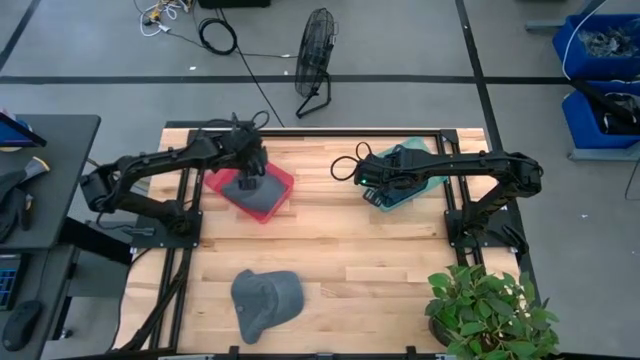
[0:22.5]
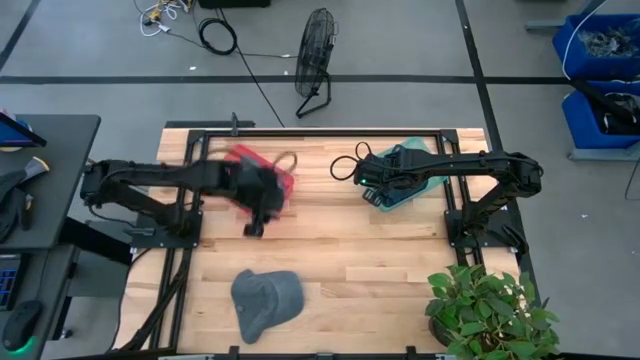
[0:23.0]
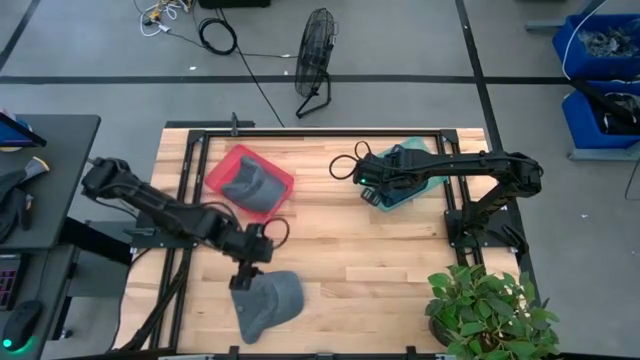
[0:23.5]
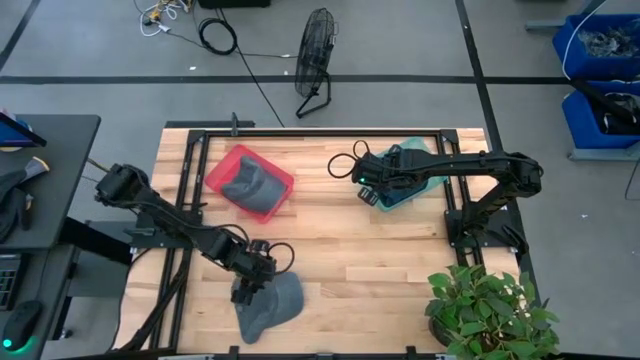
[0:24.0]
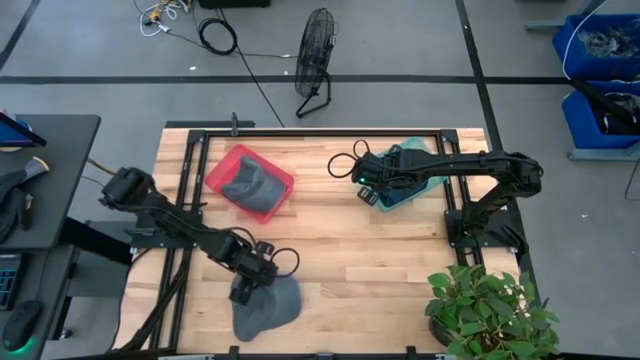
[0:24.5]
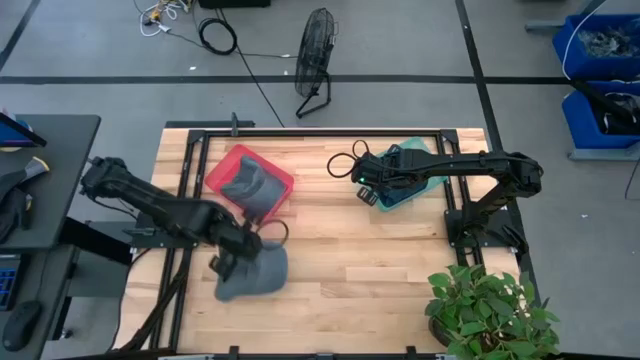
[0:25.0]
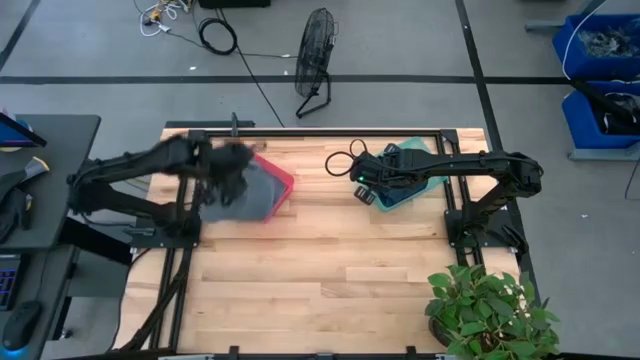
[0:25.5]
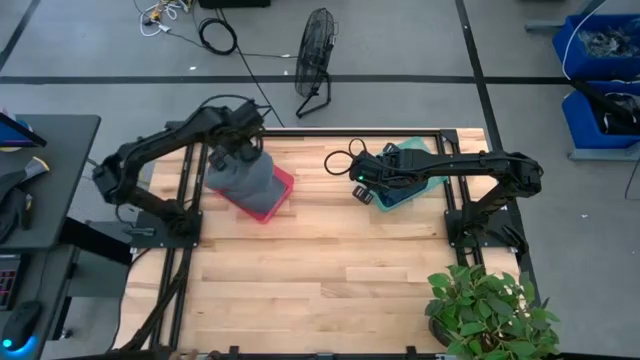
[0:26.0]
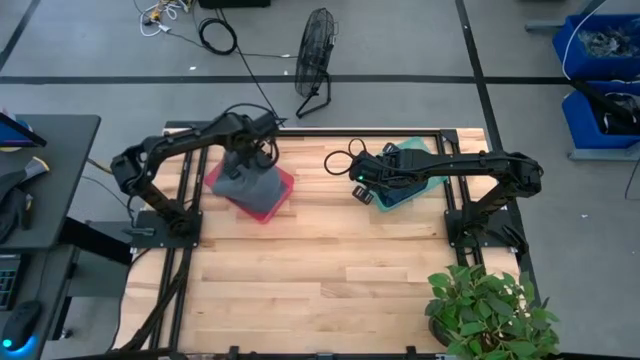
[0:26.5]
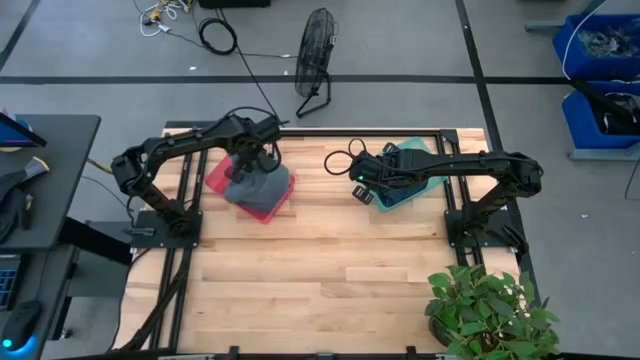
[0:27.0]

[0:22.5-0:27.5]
Task: Pick & Place hat
Put the gray cap into the red bin

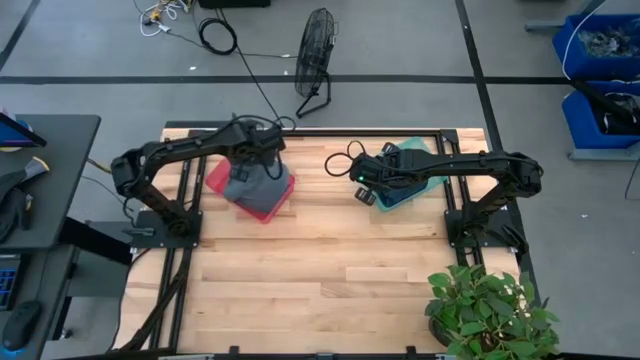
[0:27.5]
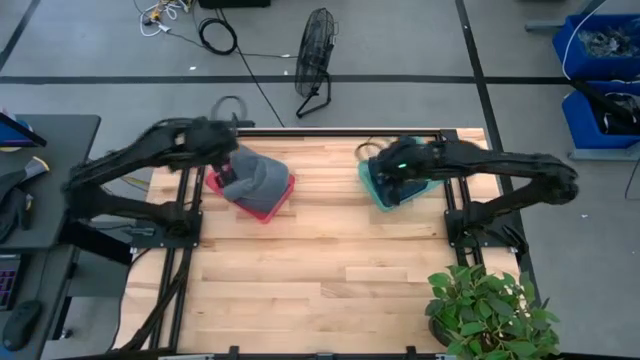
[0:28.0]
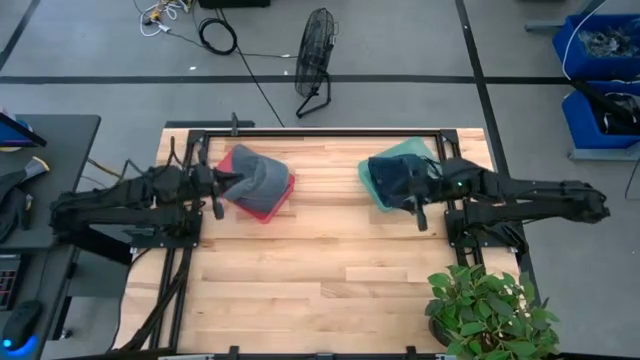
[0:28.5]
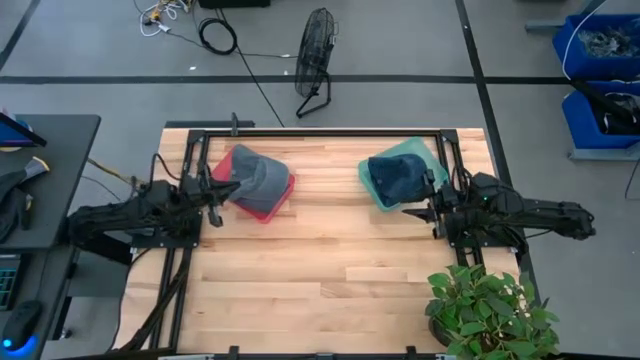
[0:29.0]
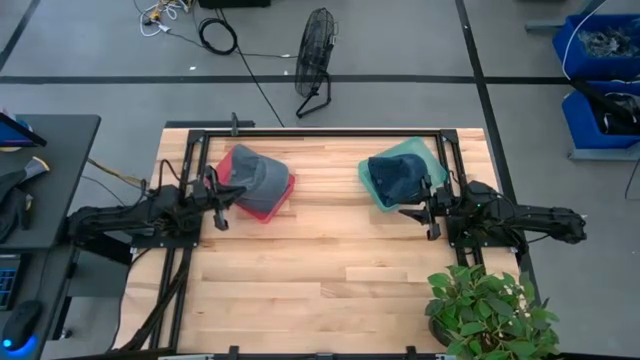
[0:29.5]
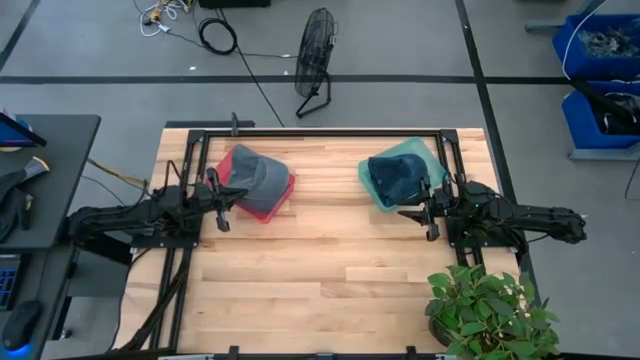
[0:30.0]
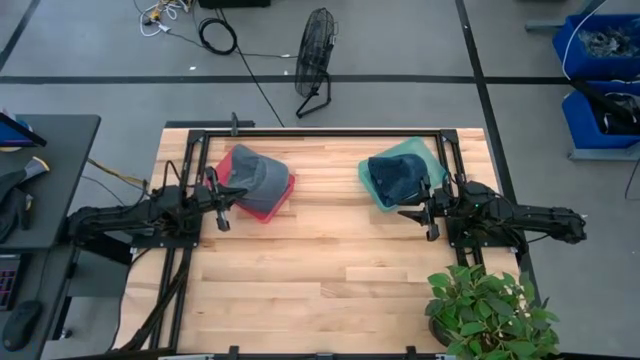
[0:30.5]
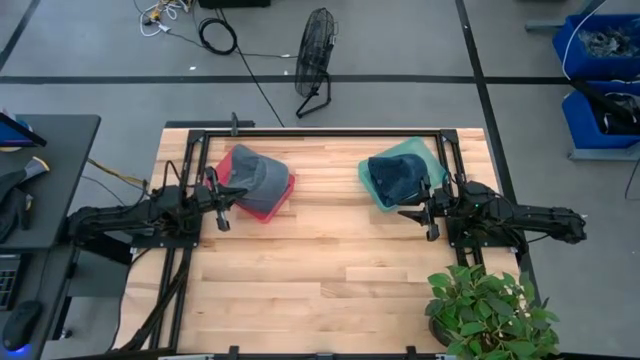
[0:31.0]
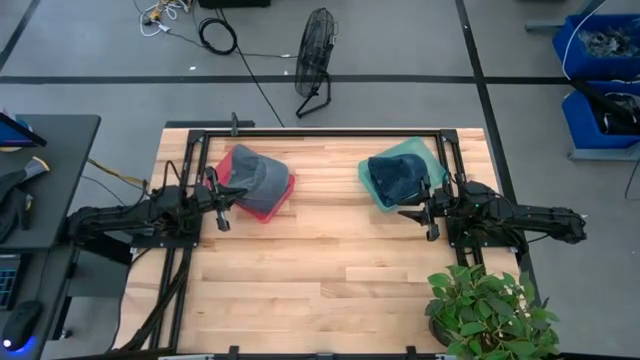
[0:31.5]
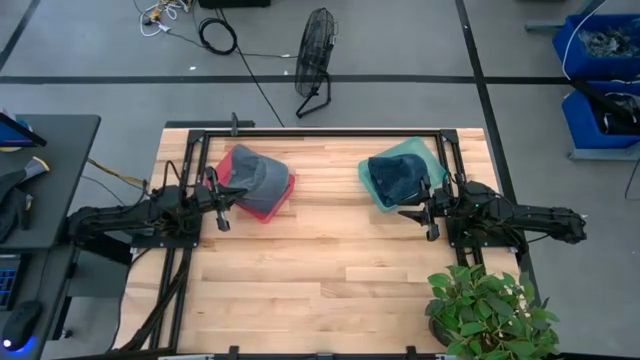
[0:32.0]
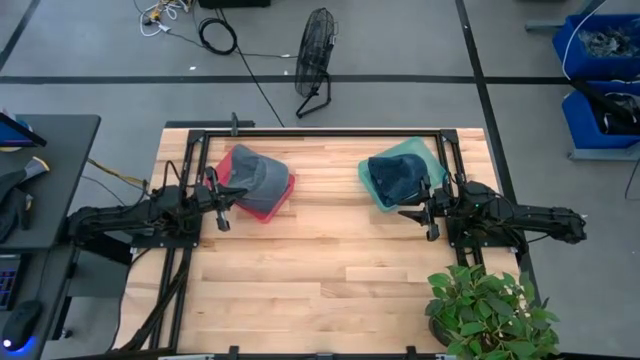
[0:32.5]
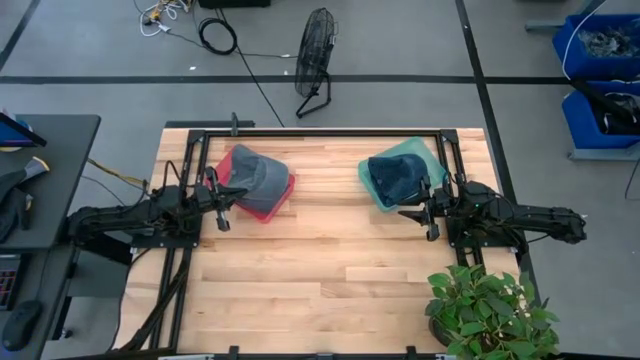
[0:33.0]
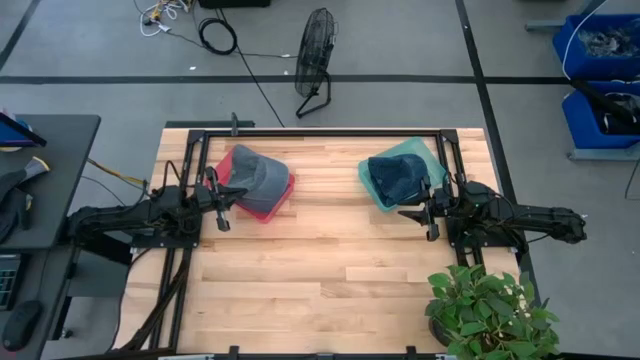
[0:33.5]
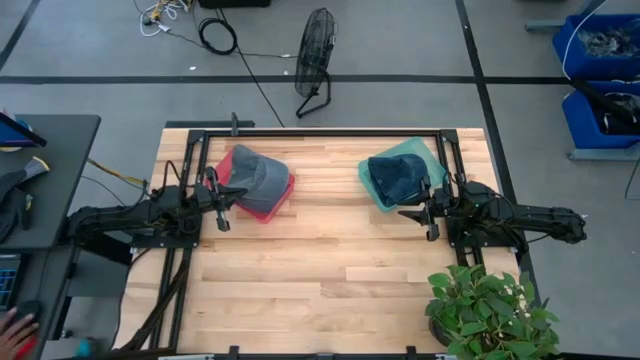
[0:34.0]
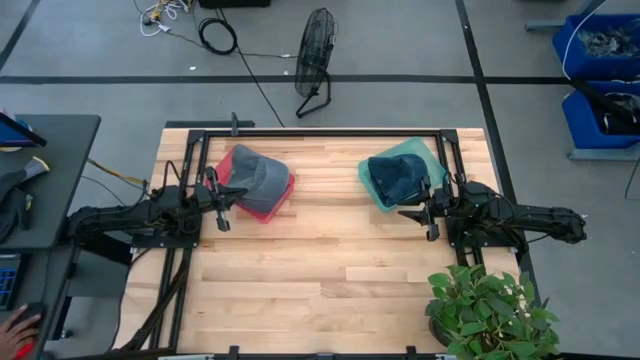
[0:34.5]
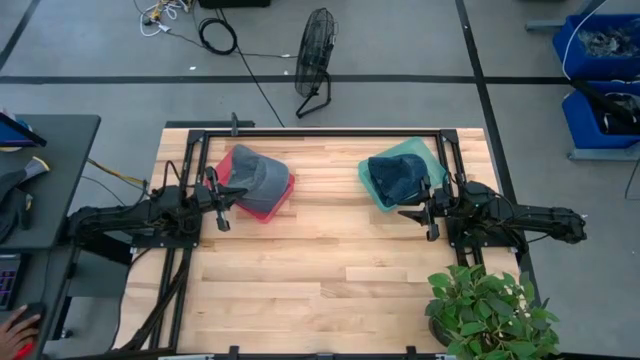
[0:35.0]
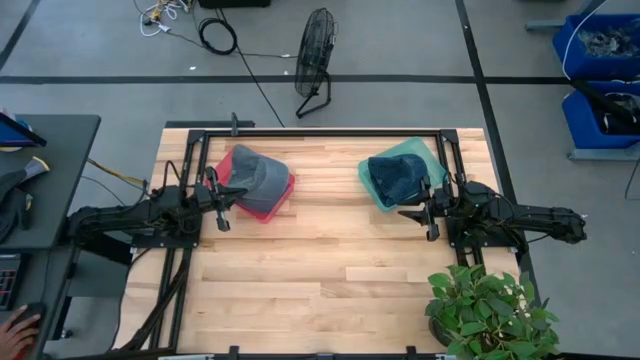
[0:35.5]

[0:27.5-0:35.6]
Return to Home Position

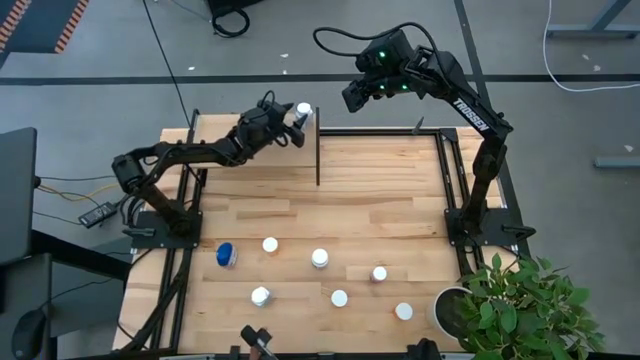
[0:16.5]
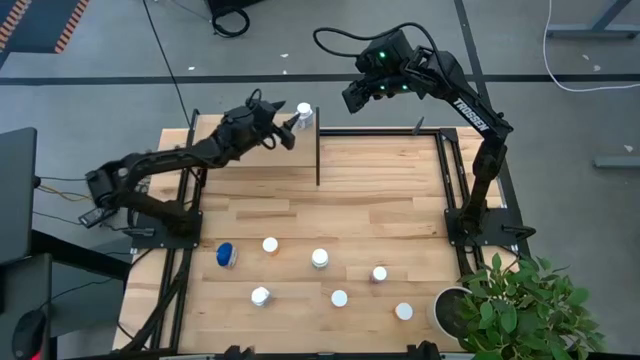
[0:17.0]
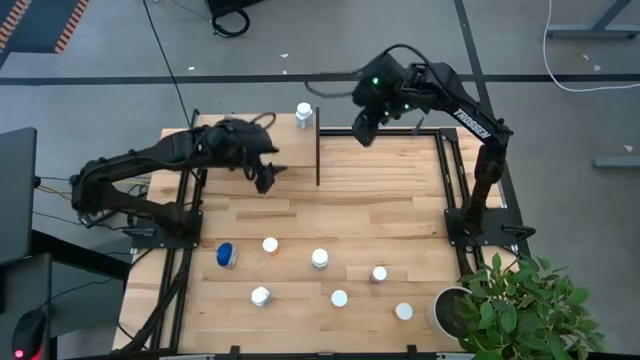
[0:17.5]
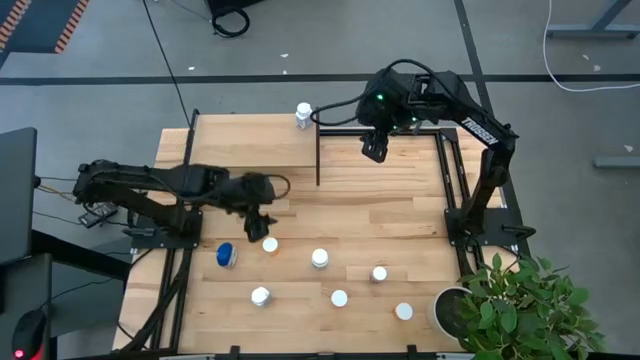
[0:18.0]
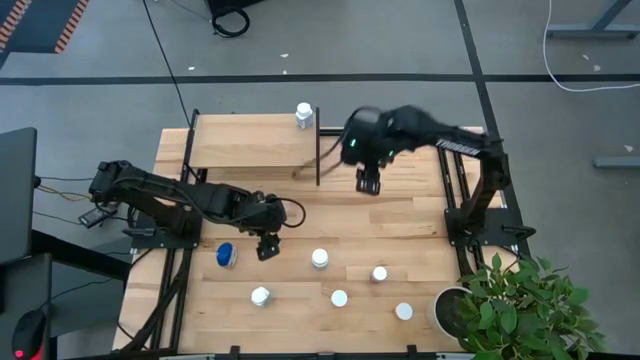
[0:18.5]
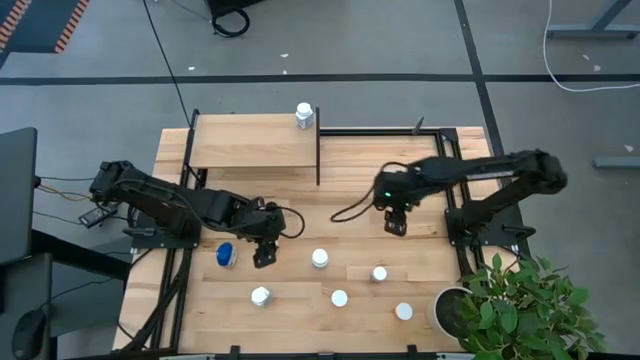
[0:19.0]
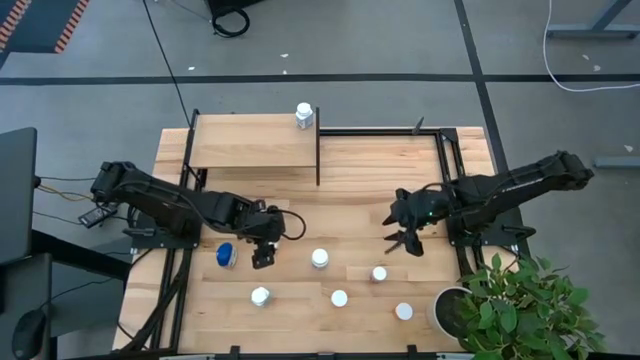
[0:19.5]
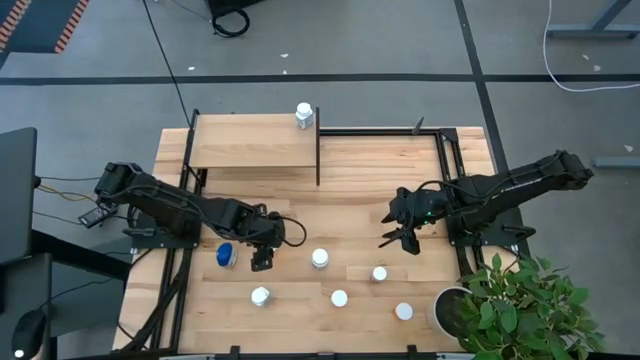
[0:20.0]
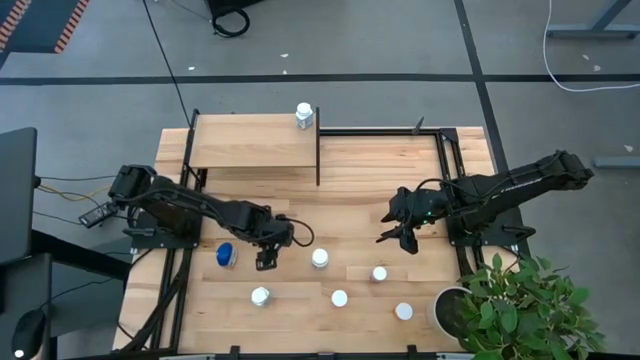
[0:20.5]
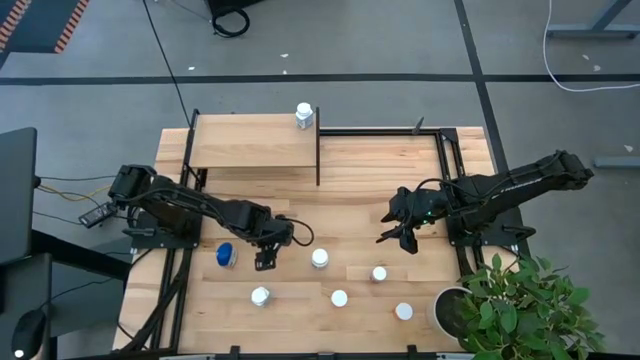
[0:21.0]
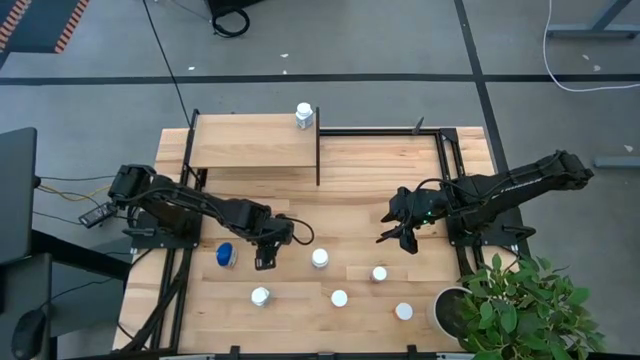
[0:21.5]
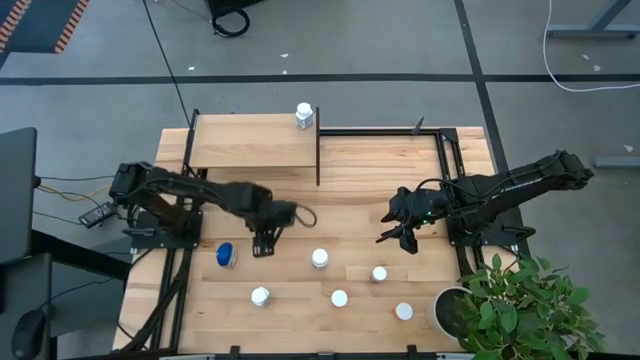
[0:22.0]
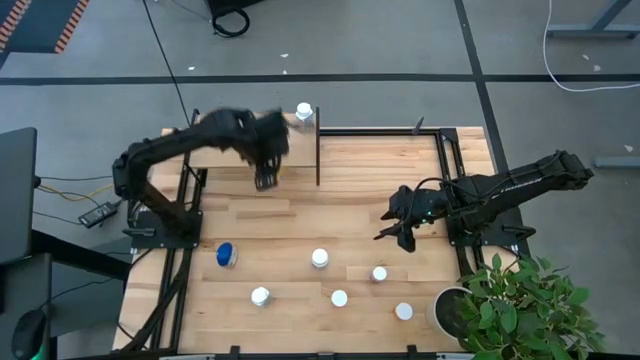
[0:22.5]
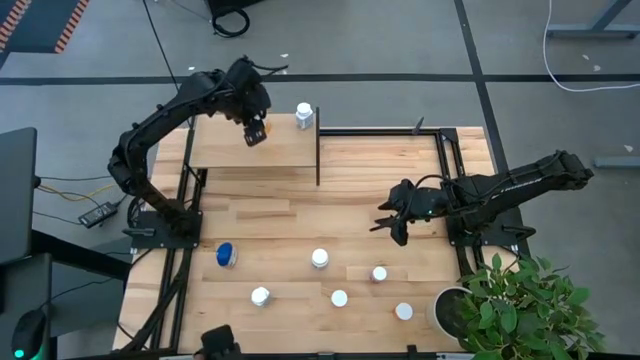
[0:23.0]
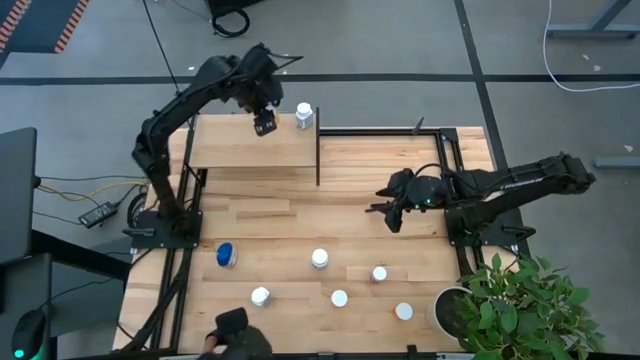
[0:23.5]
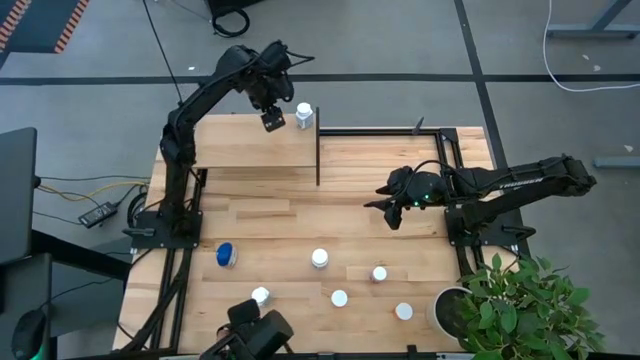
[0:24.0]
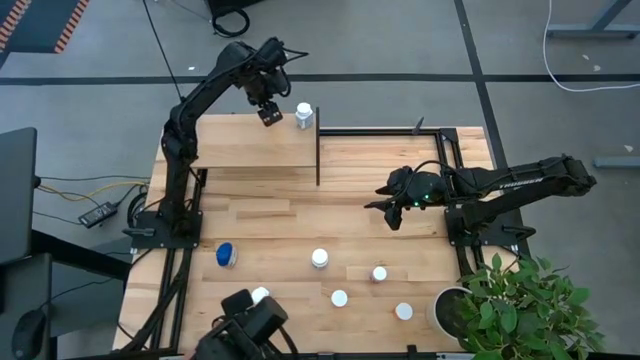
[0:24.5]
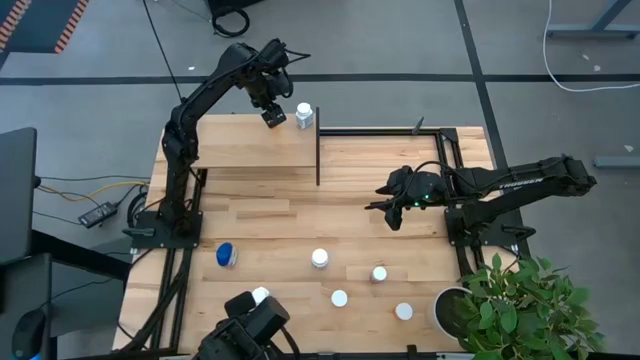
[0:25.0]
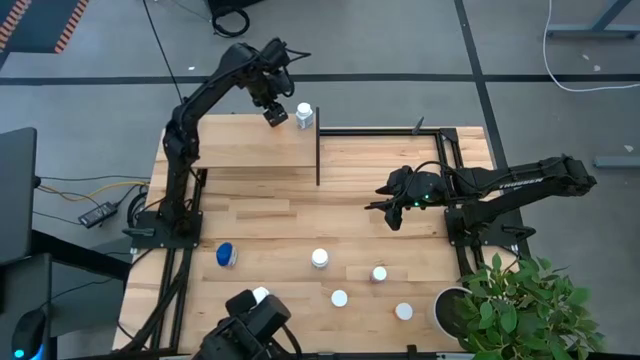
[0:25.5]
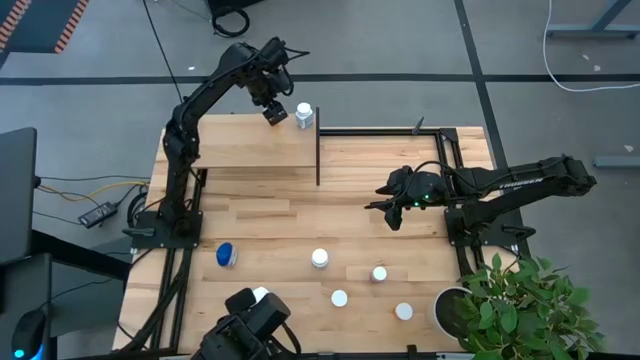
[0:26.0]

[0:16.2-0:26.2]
Task: Pick and place medicine bottles onto shelf by color
Put the left orange pill bottle on the shelf
